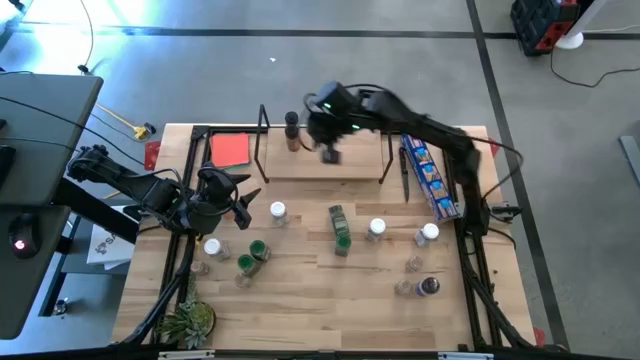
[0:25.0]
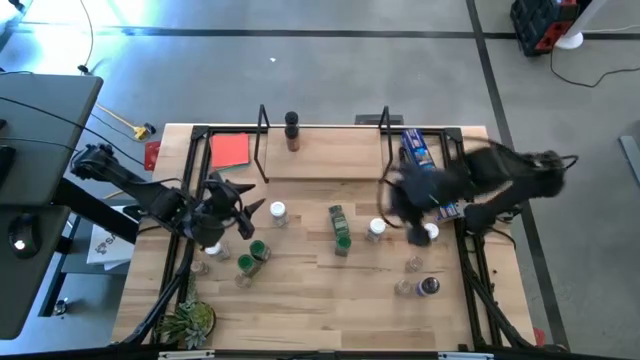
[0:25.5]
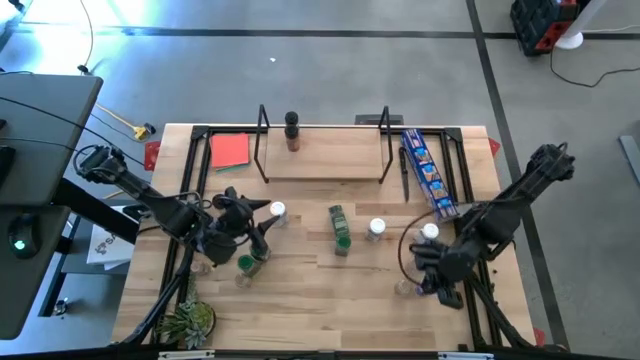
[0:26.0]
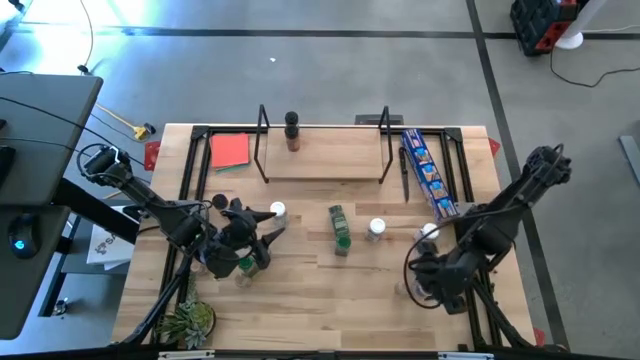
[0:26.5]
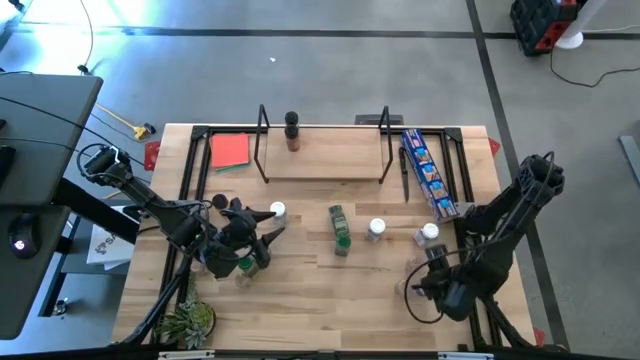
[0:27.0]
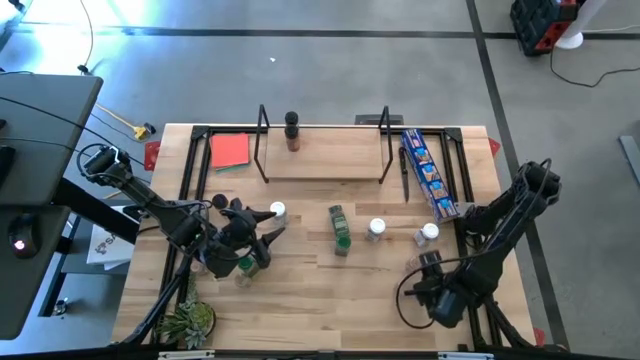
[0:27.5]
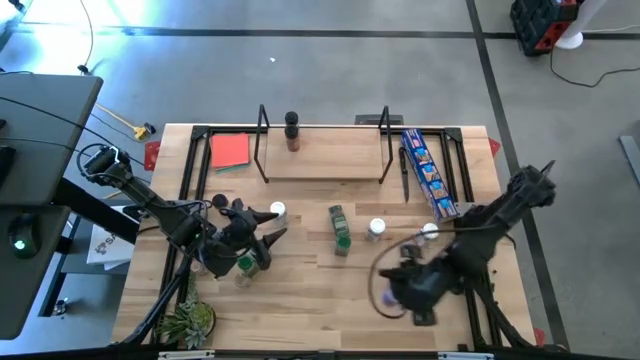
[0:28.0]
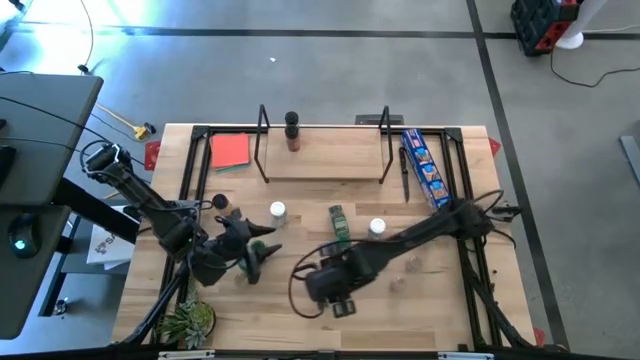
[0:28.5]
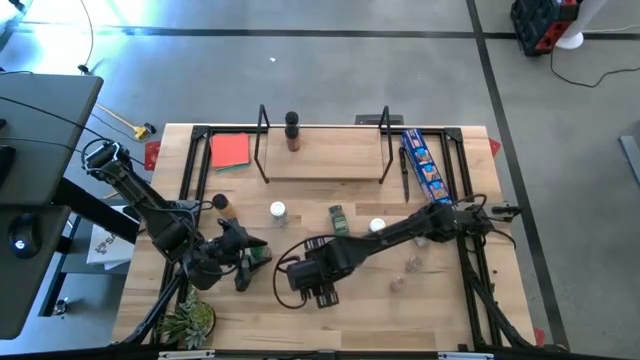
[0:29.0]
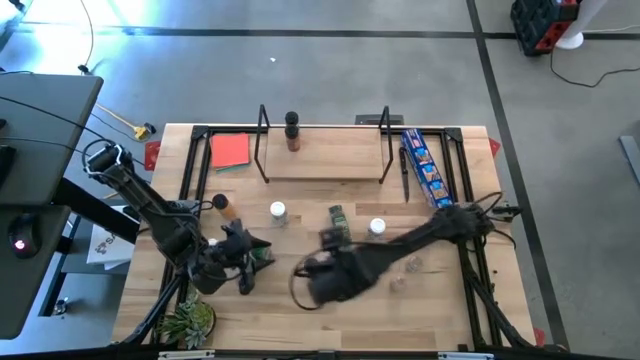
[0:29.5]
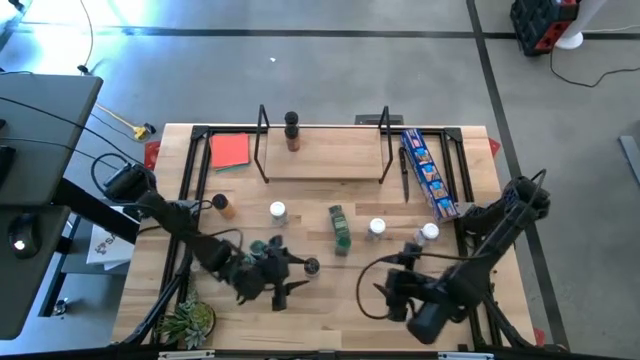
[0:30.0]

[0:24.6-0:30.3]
Task: Shelf spices
Put the black seasoning bottle on the shelf aligned with the other black seasoning bottles

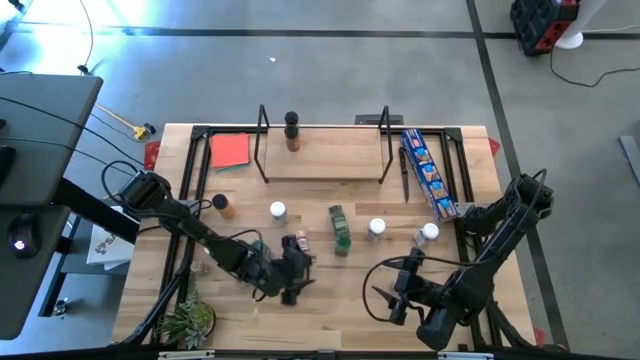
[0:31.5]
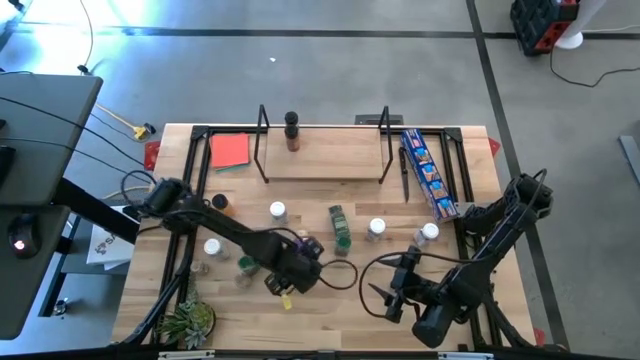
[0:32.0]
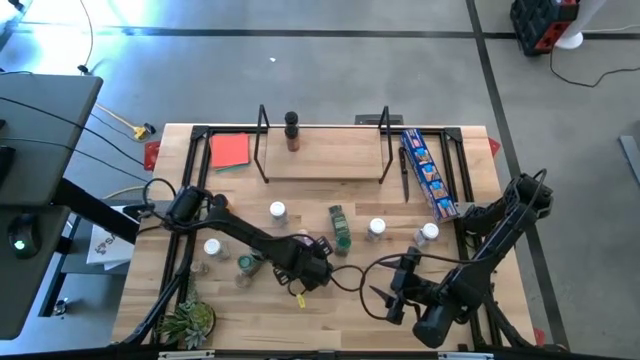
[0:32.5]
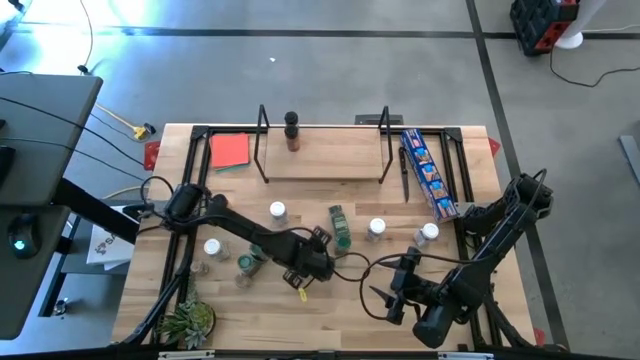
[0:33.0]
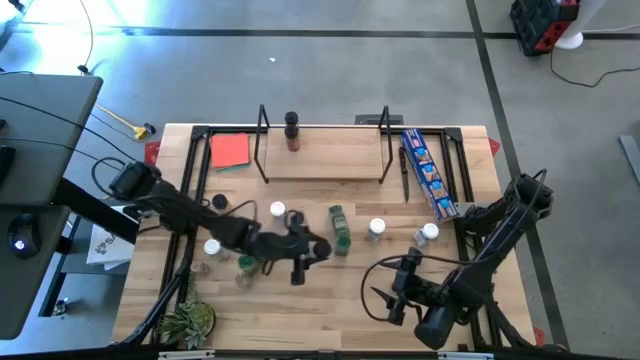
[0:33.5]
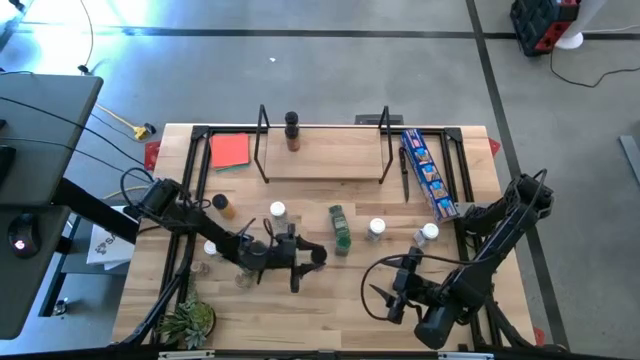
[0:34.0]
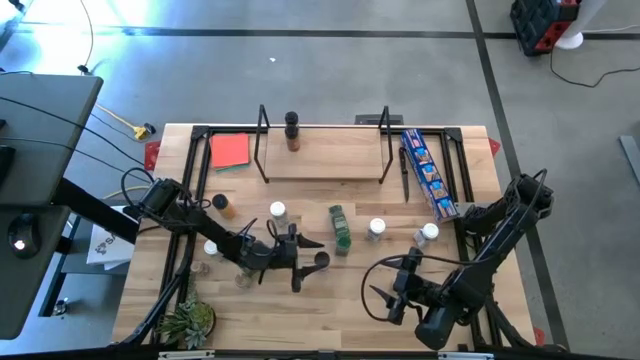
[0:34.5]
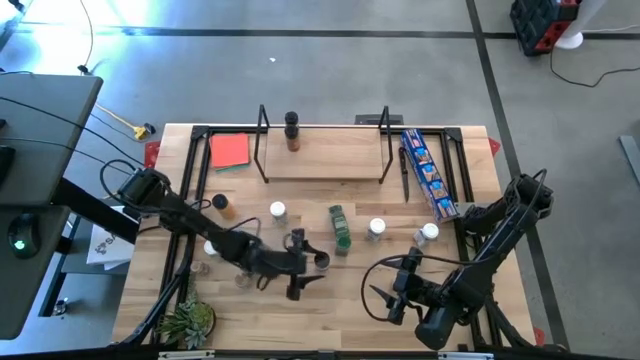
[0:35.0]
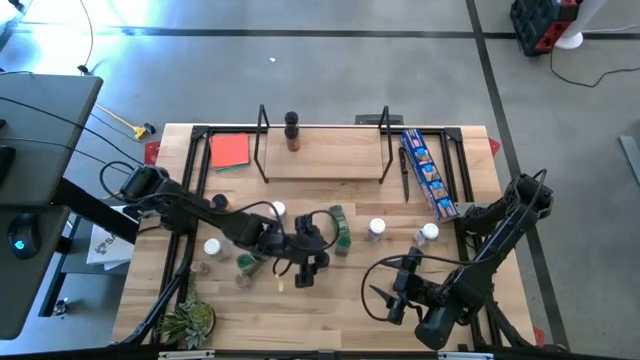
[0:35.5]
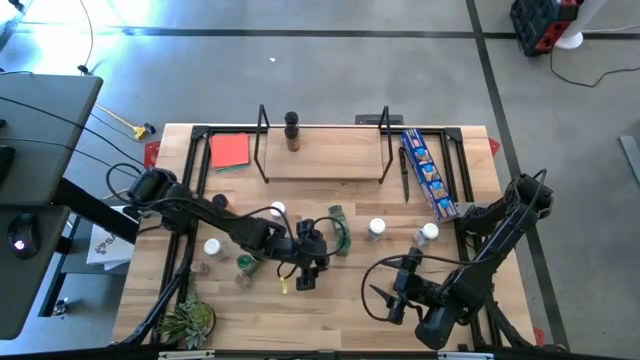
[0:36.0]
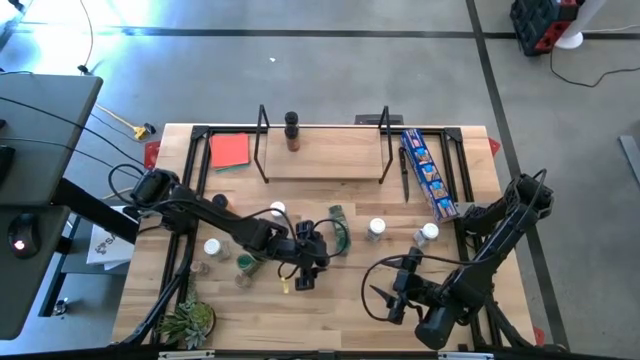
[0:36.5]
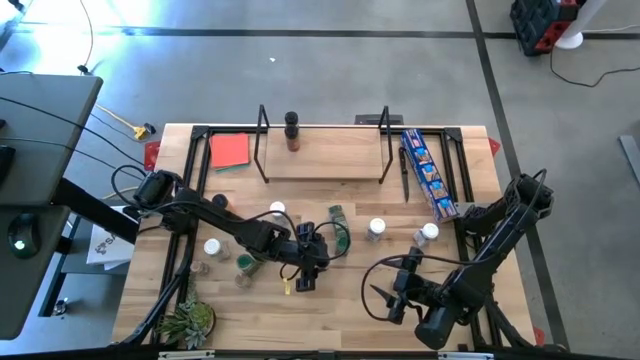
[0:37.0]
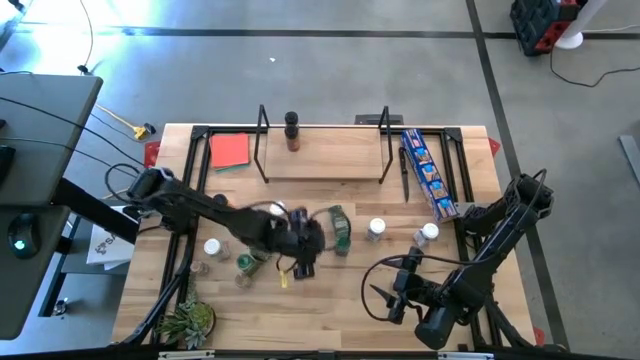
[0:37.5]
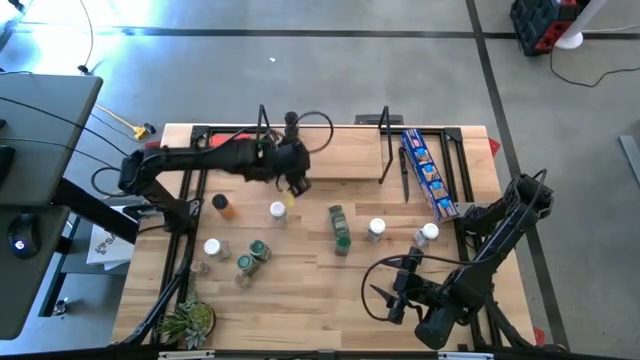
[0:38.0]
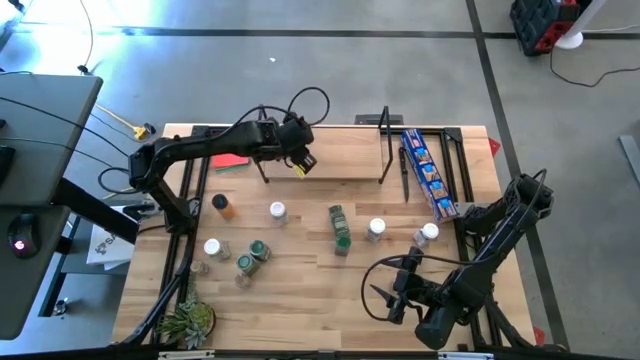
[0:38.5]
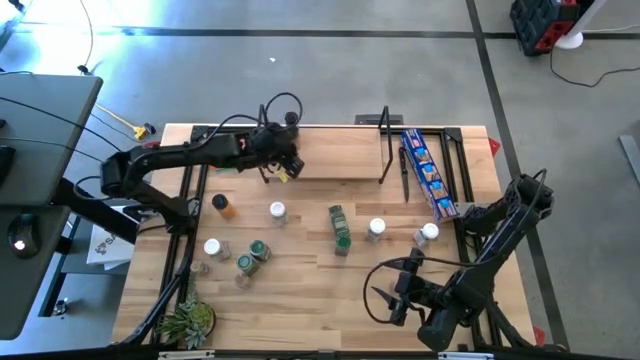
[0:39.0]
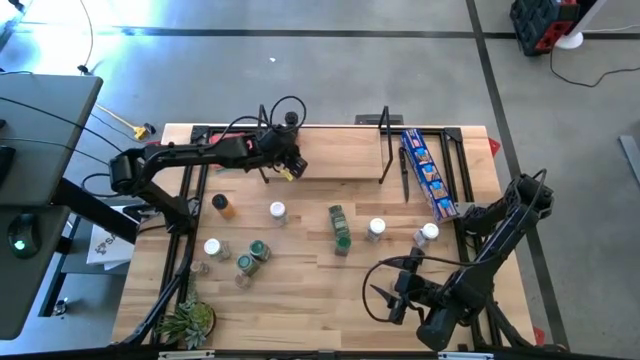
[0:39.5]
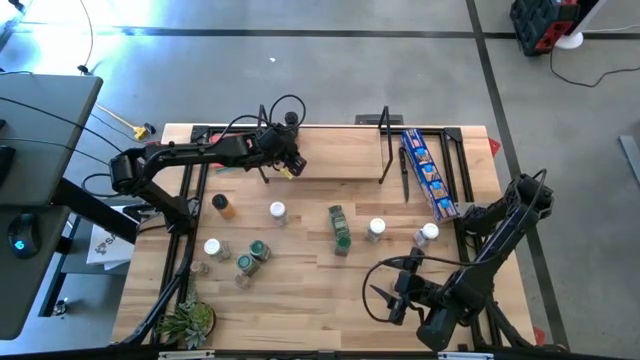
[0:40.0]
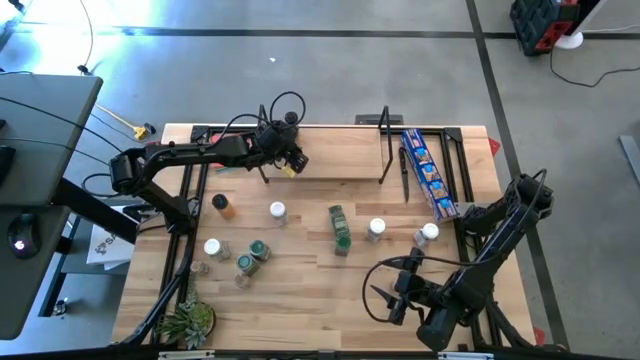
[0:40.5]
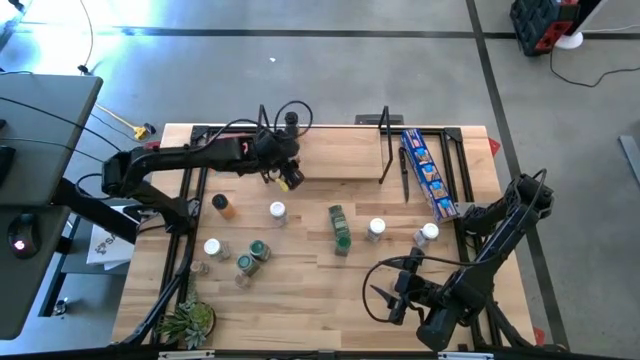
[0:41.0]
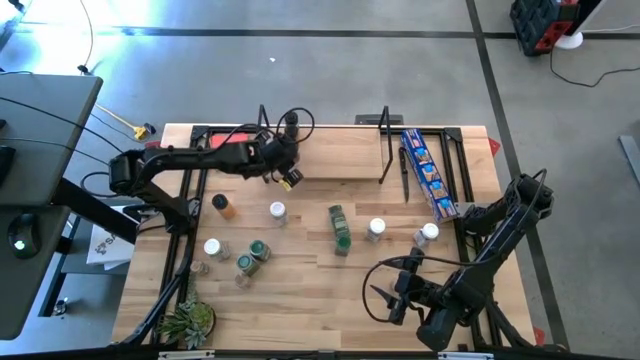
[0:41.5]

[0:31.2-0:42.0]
Put the black seasoning bottle on the shelf aligned with the other black seasoning bottles

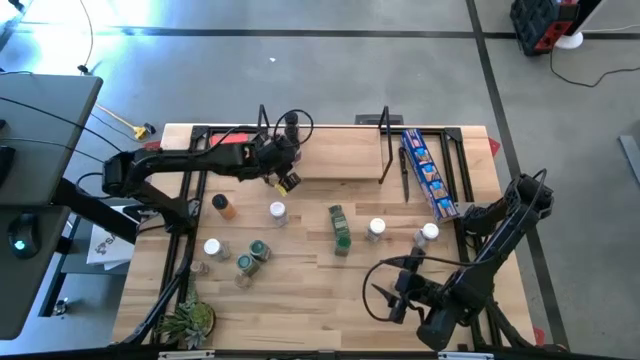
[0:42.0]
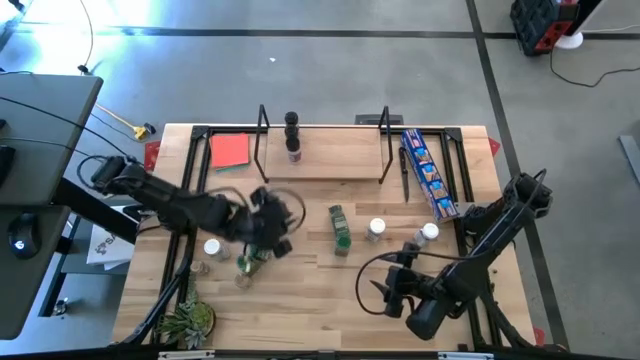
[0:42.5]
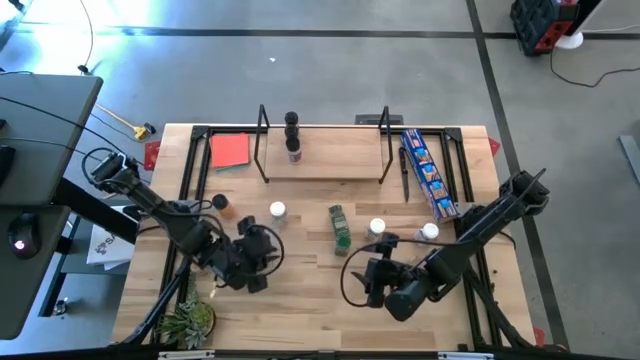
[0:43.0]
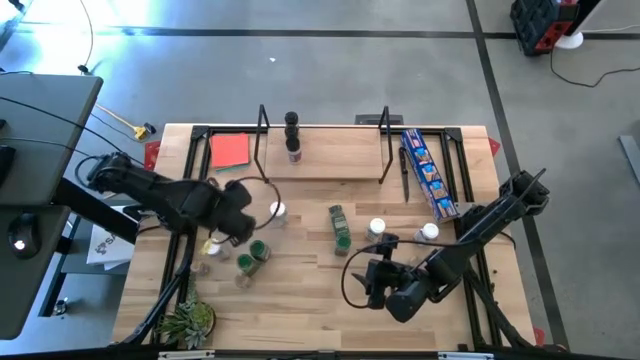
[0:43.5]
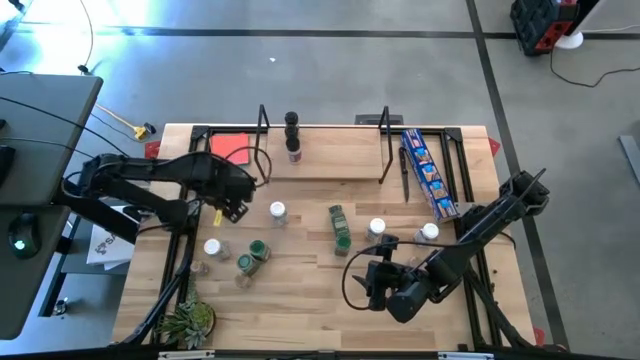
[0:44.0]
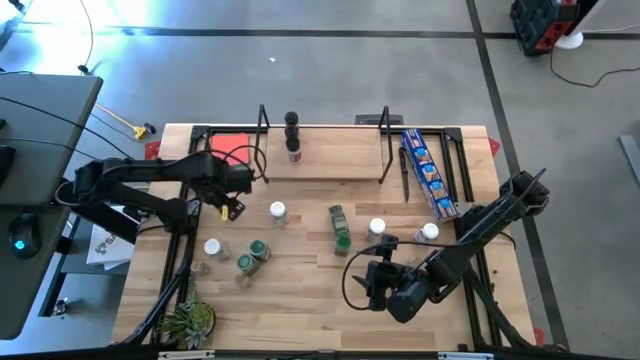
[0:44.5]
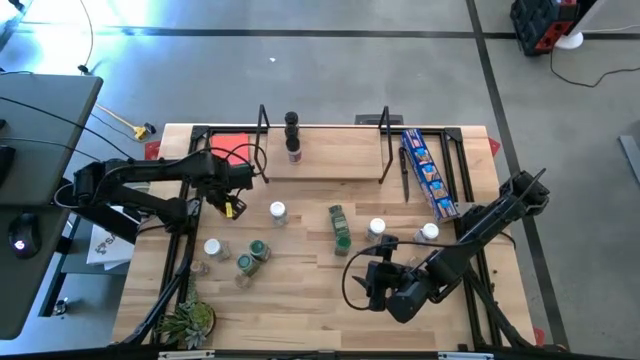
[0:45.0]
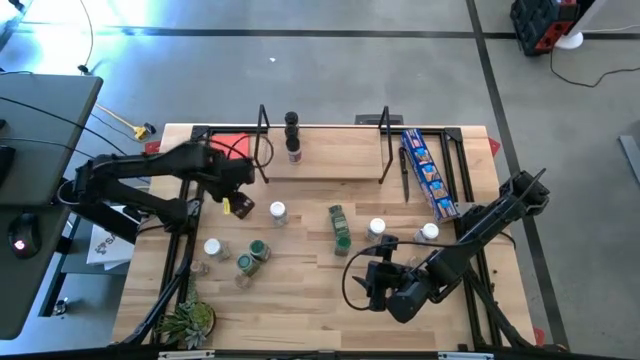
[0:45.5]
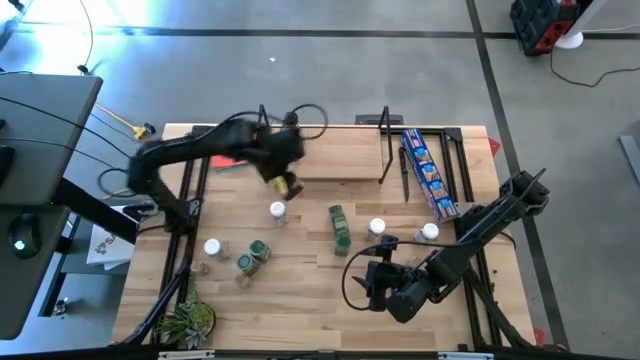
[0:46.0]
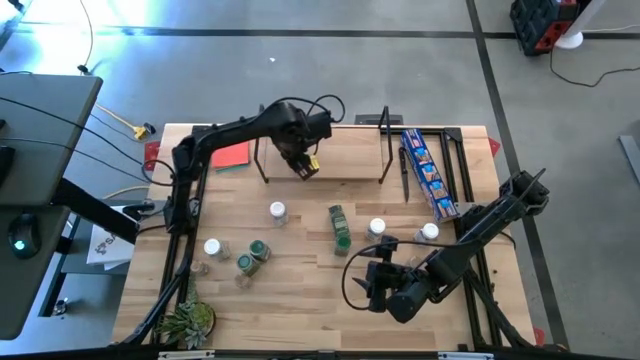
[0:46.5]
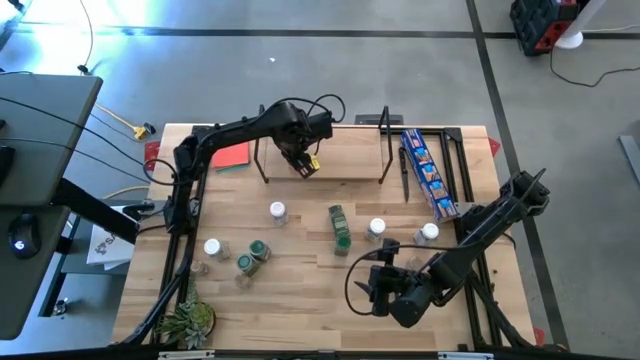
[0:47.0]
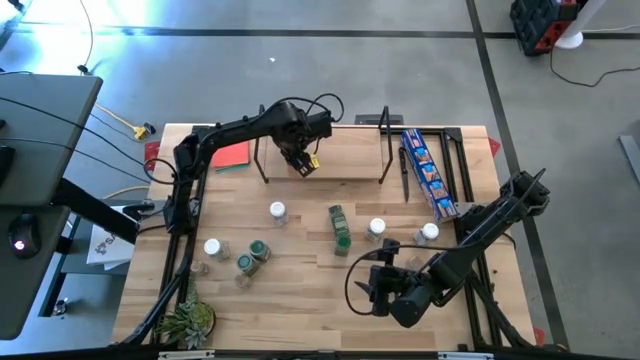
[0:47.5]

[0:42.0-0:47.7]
Put the black seasoning bottle on the shelf aligned with the other black seasoning bottles
